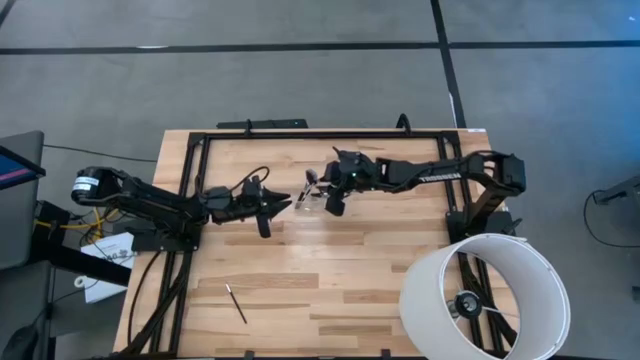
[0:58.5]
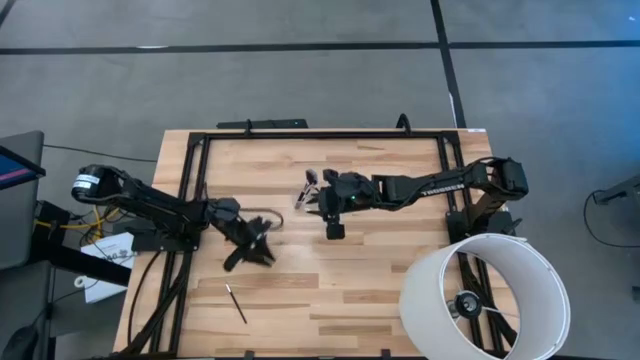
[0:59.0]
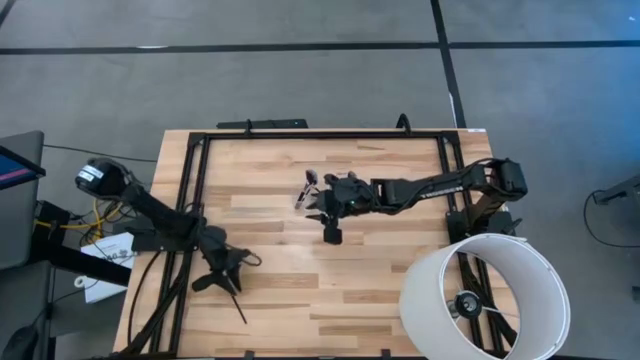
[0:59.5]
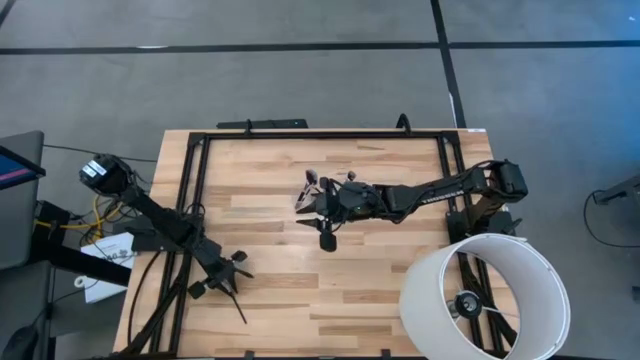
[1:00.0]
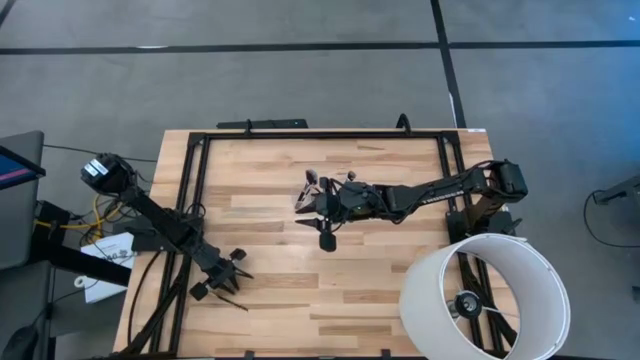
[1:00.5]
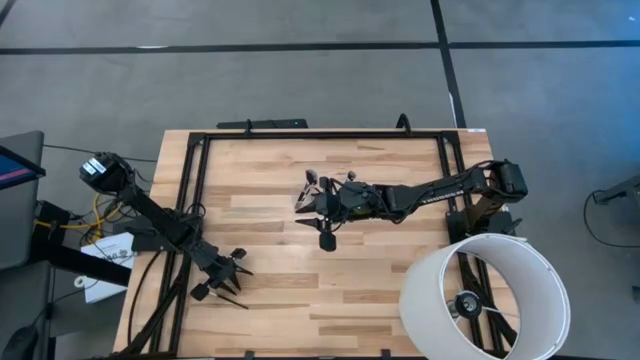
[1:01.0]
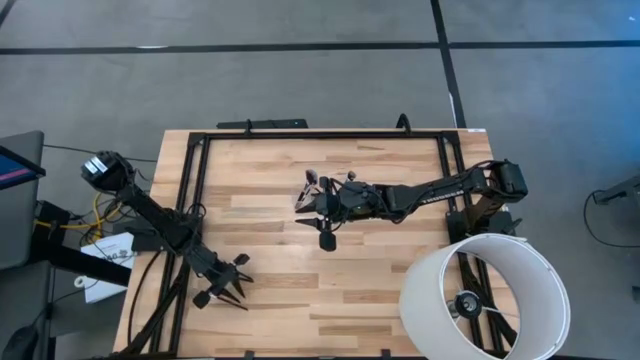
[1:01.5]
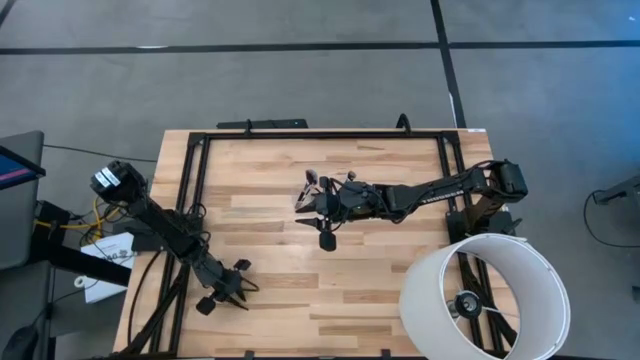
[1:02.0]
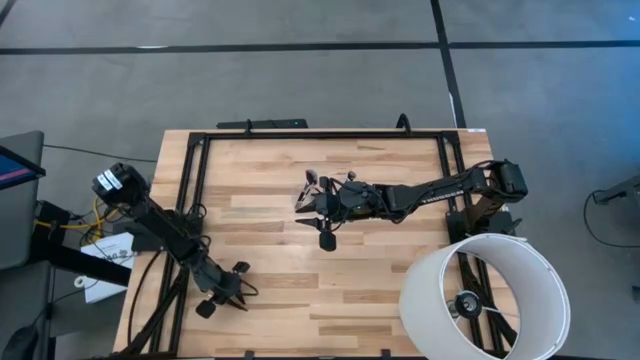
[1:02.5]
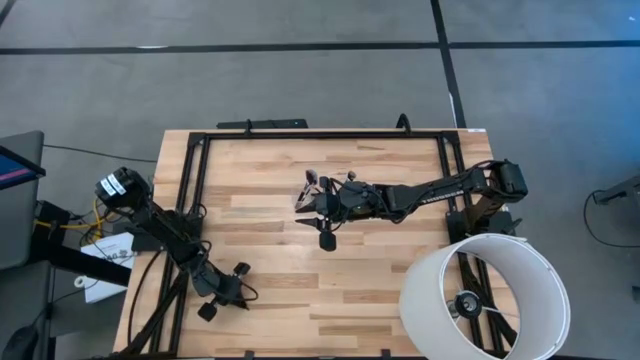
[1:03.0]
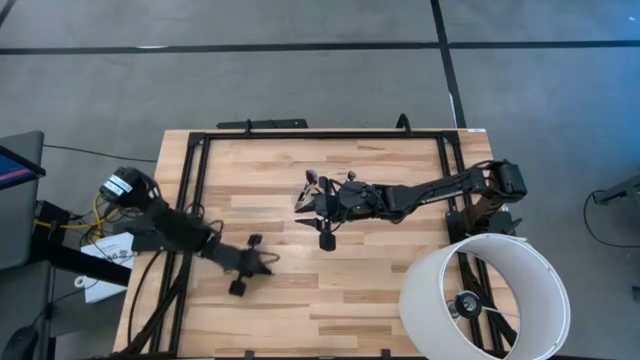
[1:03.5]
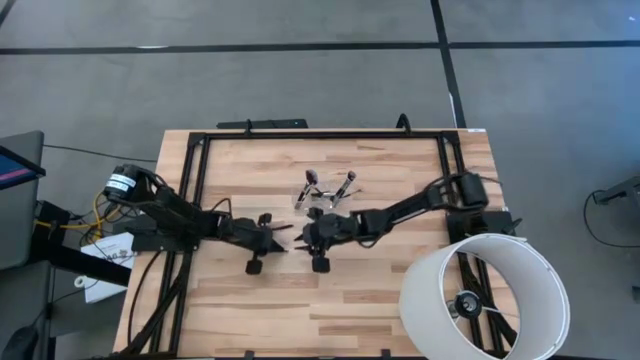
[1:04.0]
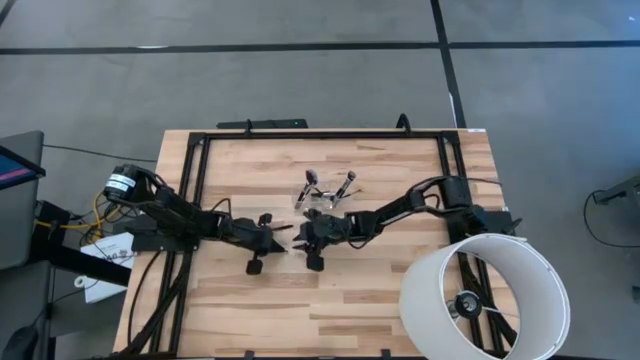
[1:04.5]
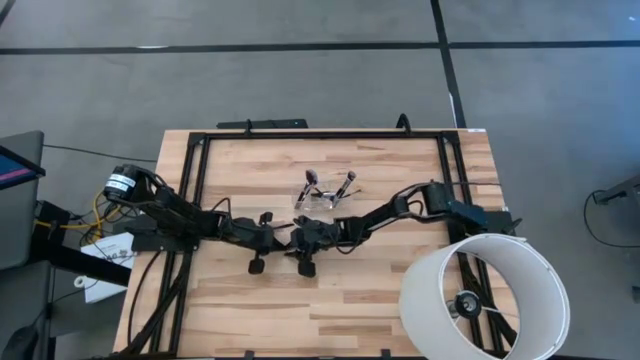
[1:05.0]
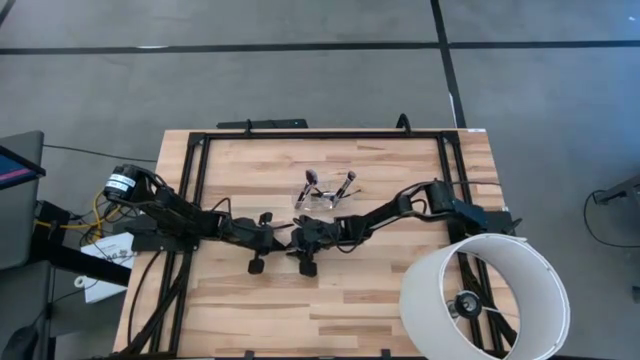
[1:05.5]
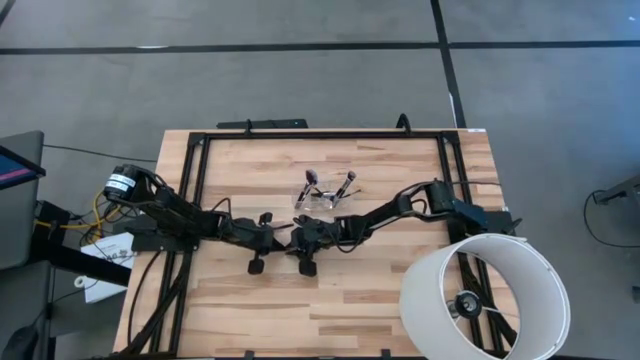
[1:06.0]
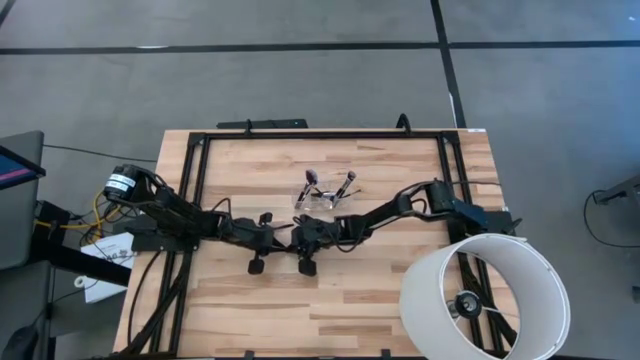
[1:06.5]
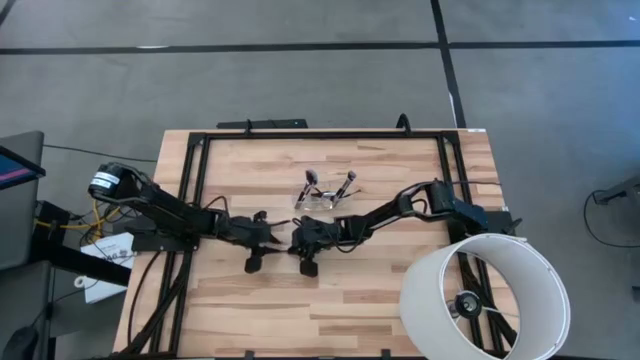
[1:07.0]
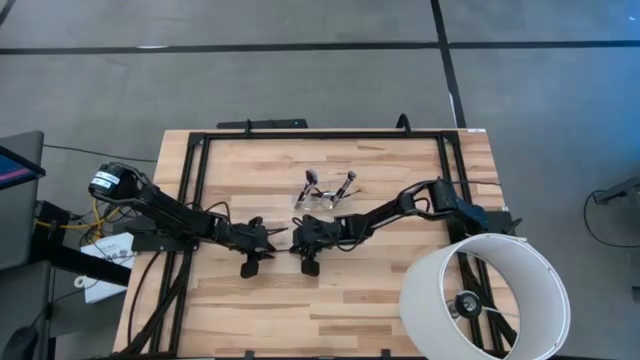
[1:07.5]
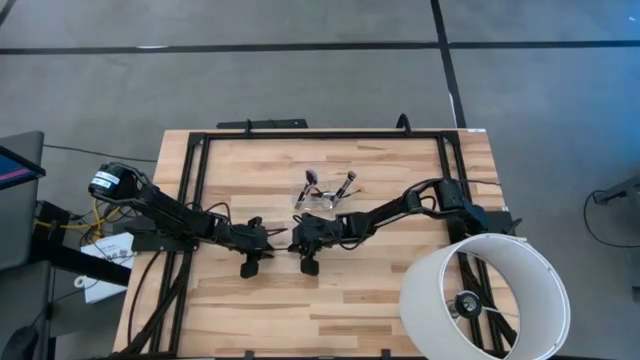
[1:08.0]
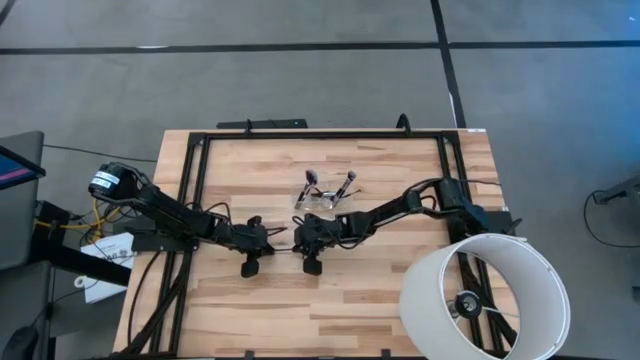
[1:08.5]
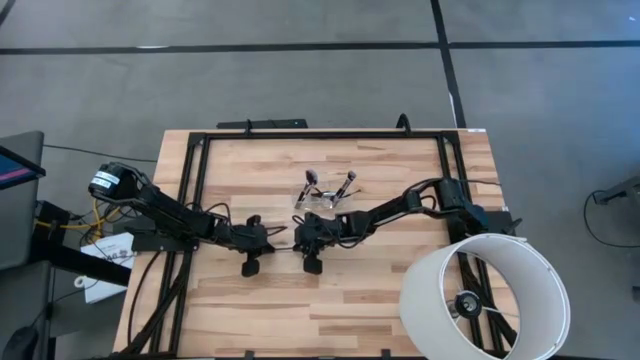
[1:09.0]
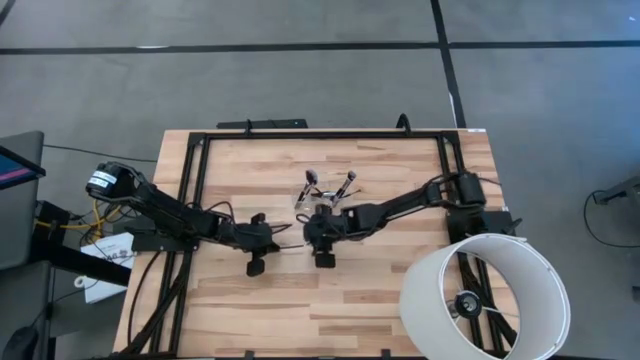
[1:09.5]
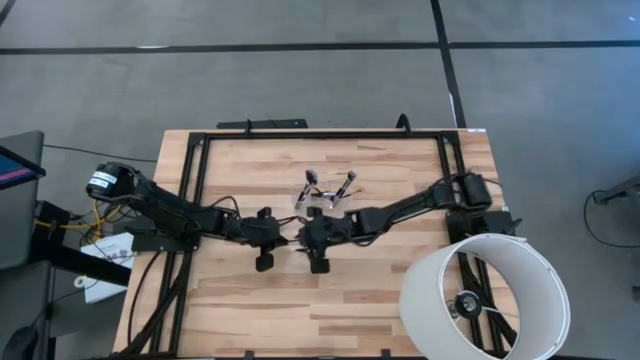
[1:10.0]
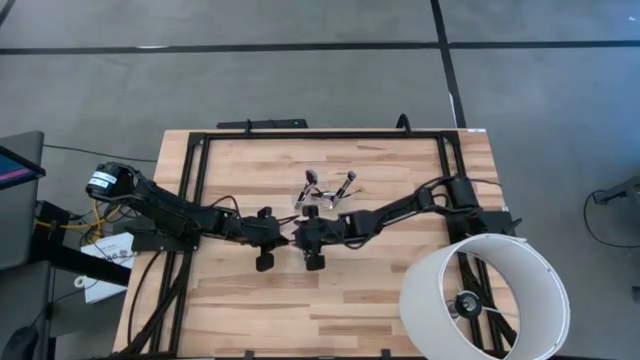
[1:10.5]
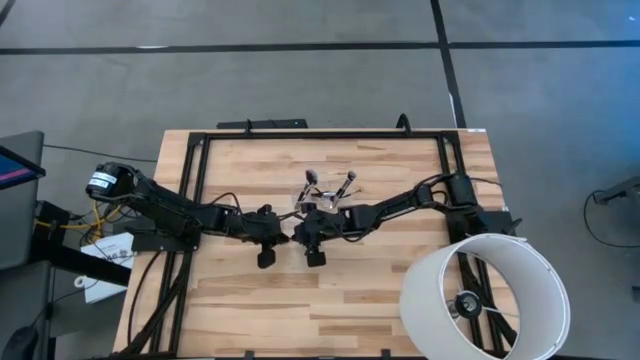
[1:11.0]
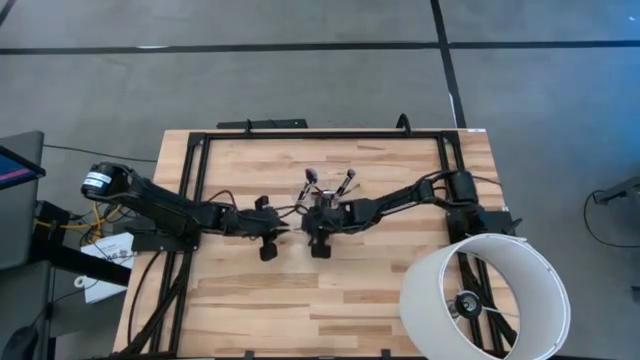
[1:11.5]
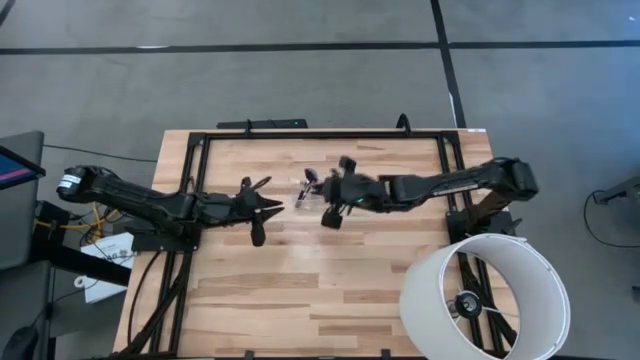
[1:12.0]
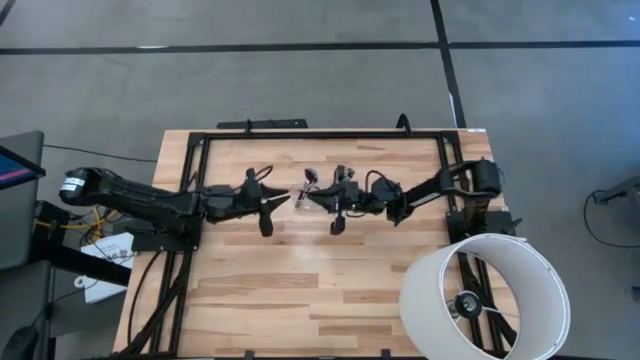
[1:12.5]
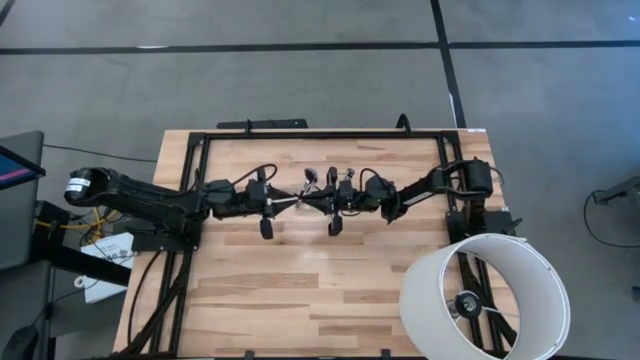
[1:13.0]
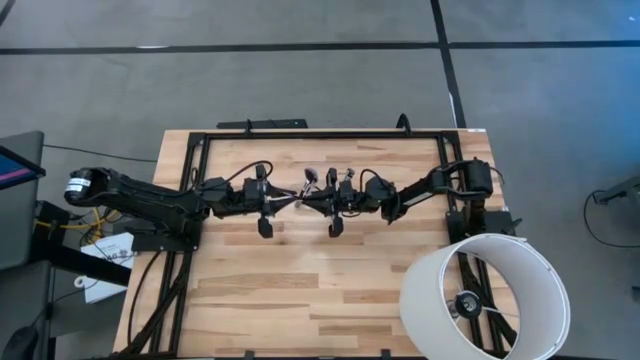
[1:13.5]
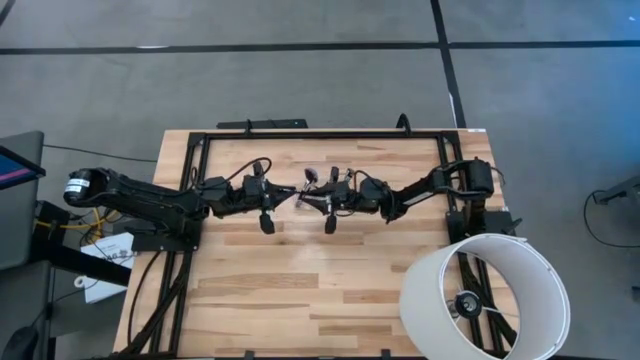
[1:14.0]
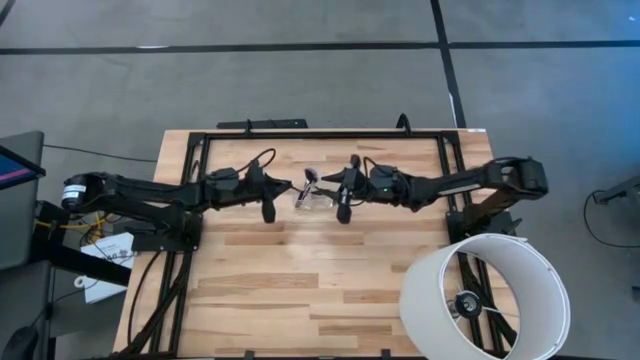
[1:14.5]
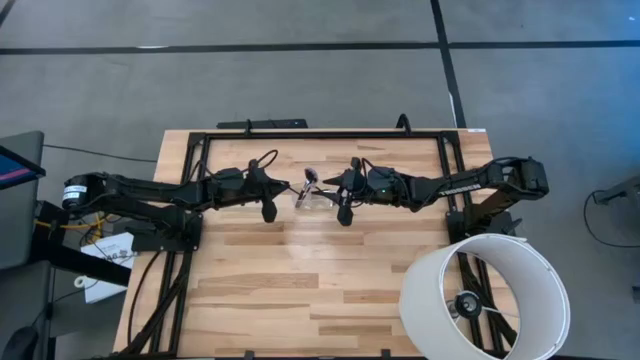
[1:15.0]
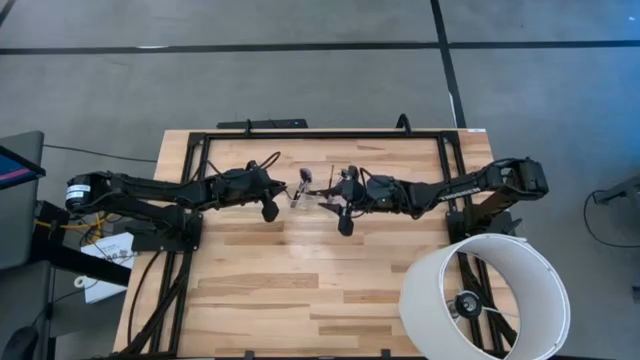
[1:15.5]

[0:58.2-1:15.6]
Task: Put items in baskets/containers
Put the liner brush into the transparent organizer

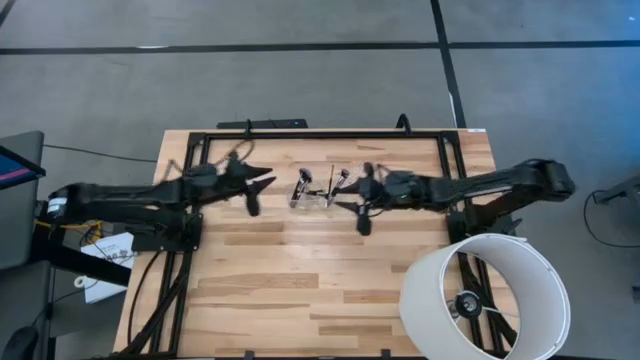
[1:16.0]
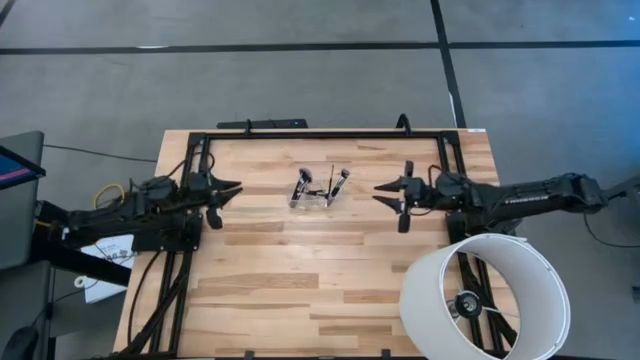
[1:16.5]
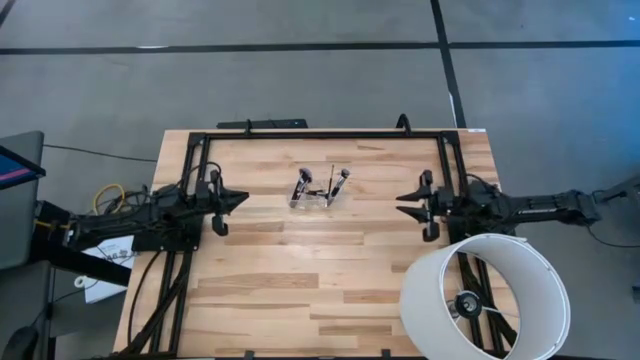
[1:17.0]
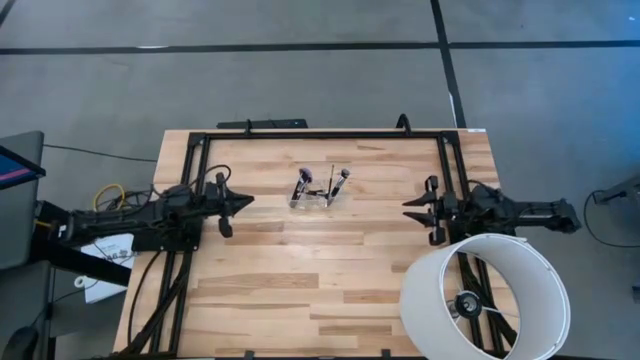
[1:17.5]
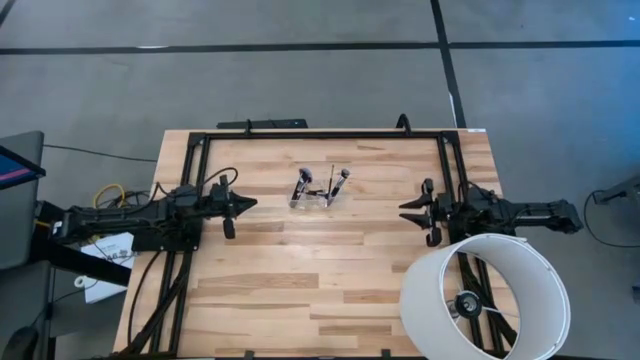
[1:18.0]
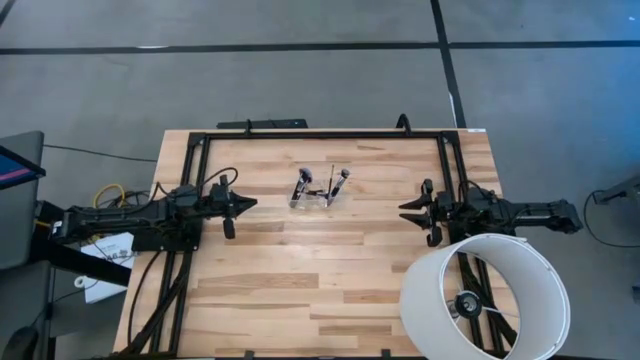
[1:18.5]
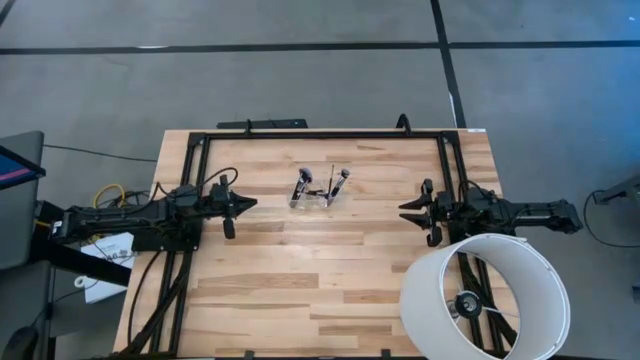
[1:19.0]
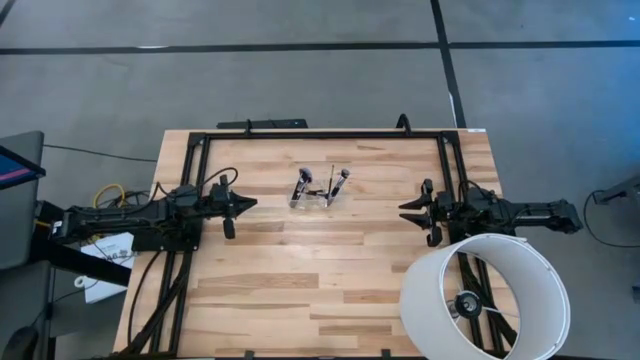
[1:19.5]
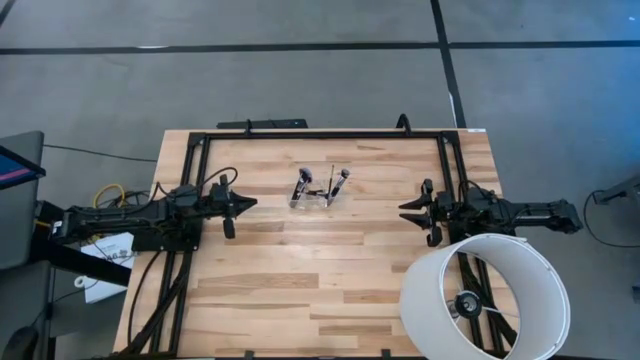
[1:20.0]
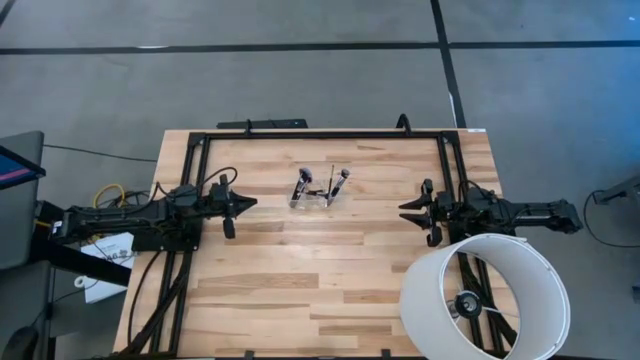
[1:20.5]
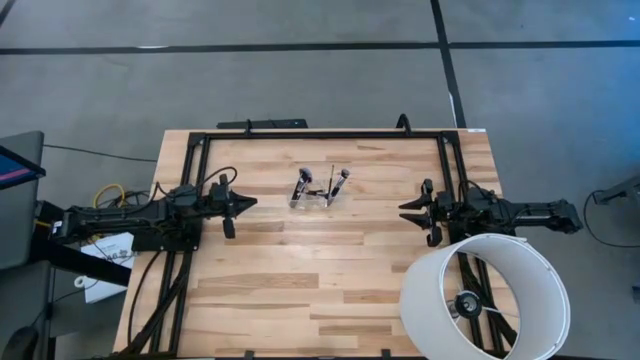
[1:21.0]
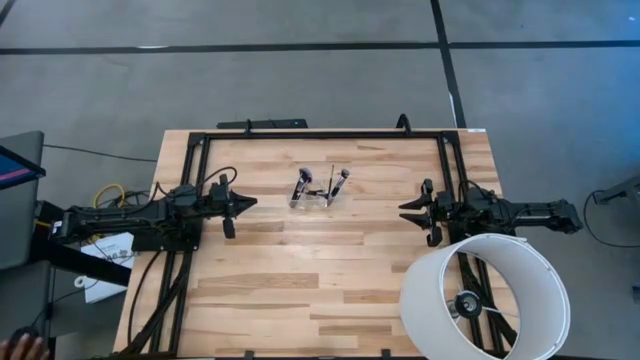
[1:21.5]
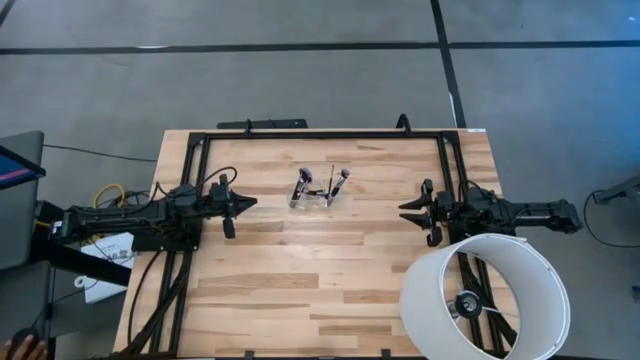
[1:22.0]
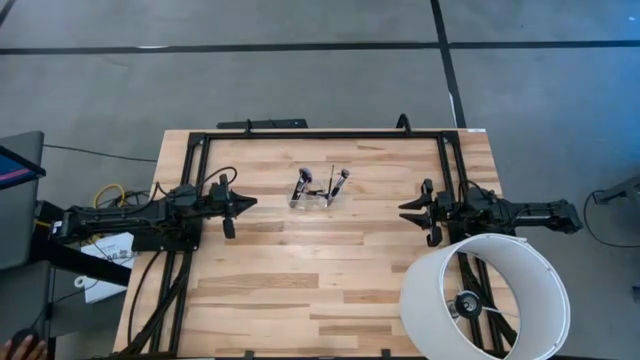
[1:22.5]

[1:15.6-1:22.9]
Return to Home Position
